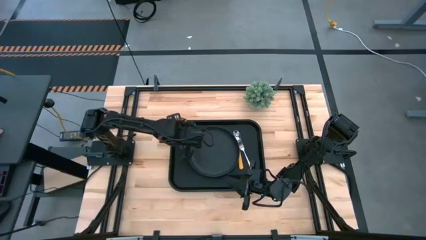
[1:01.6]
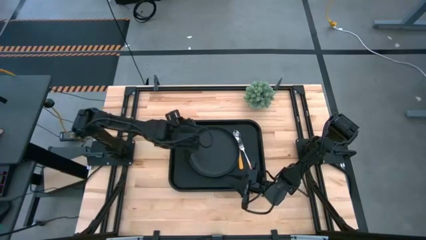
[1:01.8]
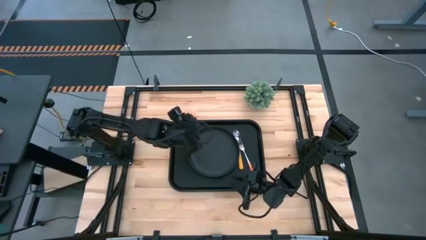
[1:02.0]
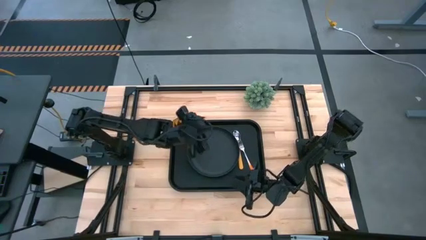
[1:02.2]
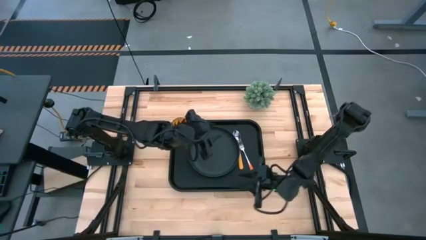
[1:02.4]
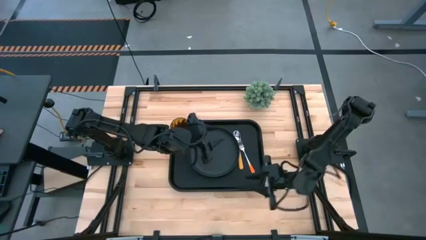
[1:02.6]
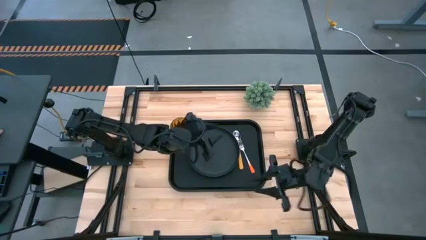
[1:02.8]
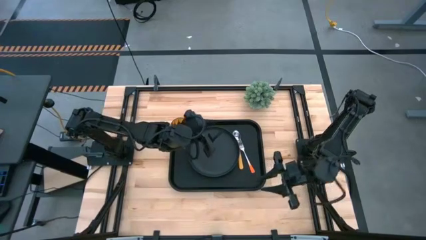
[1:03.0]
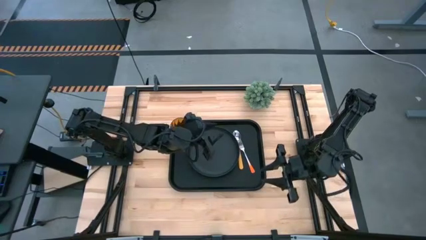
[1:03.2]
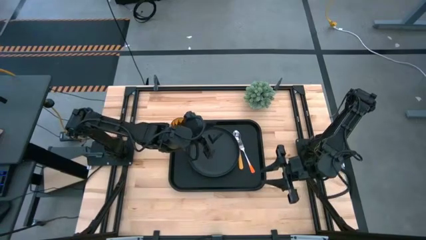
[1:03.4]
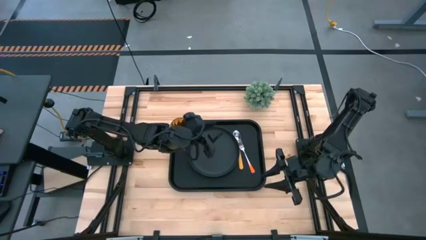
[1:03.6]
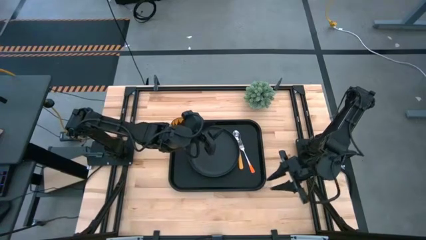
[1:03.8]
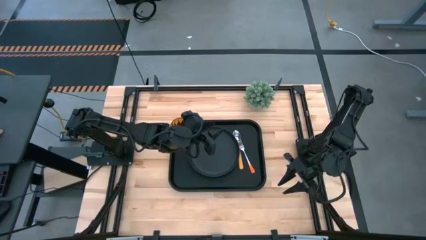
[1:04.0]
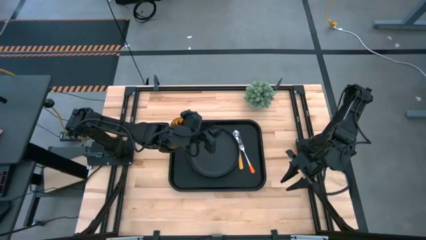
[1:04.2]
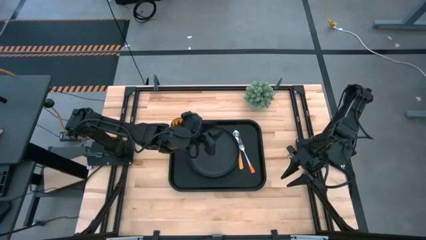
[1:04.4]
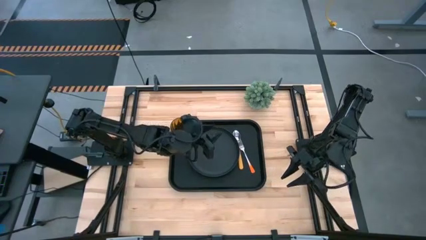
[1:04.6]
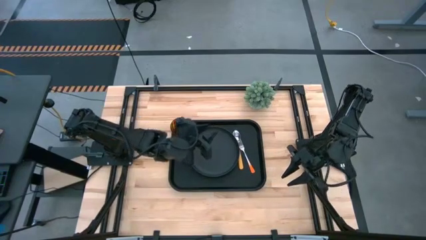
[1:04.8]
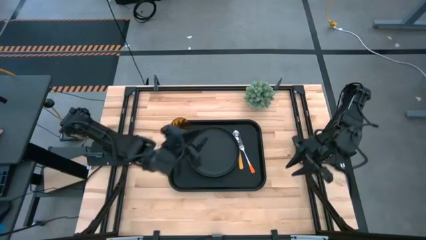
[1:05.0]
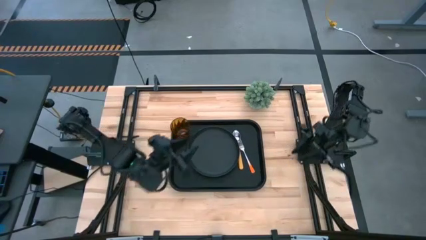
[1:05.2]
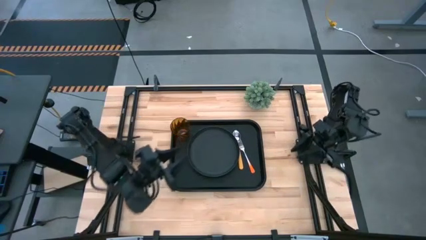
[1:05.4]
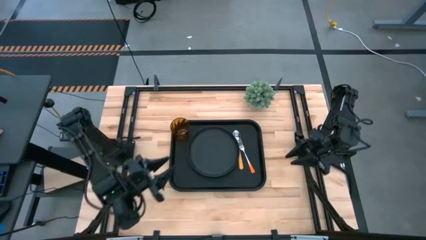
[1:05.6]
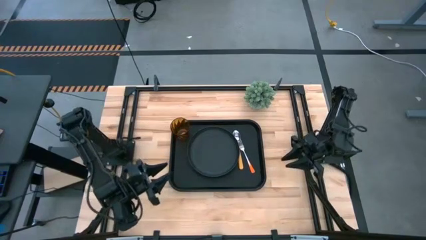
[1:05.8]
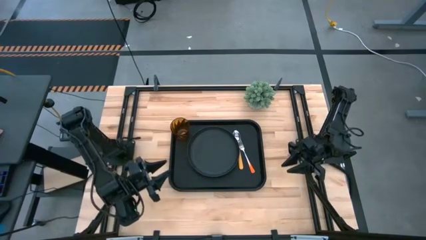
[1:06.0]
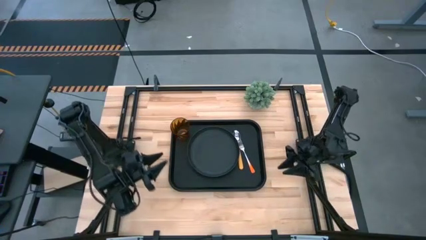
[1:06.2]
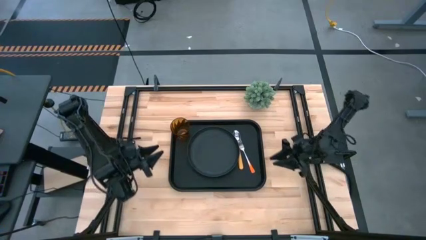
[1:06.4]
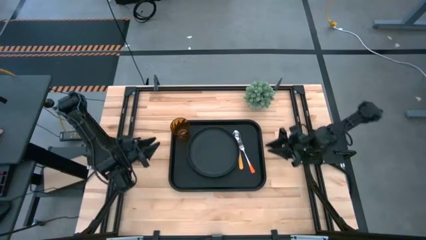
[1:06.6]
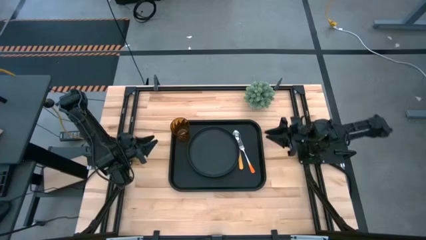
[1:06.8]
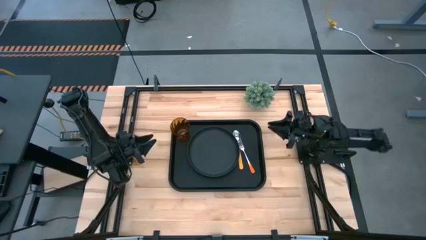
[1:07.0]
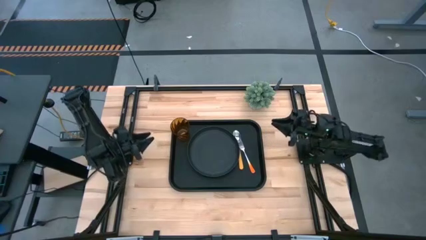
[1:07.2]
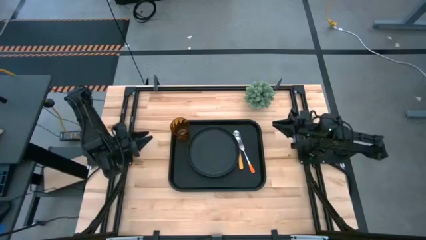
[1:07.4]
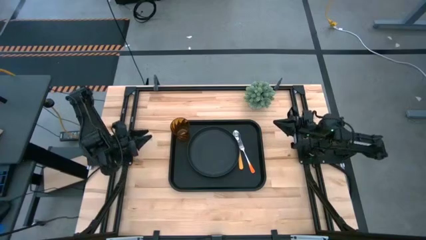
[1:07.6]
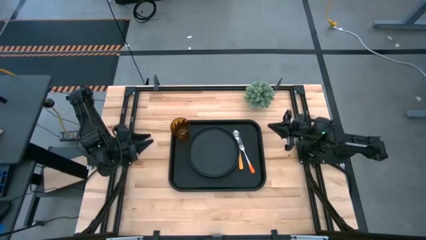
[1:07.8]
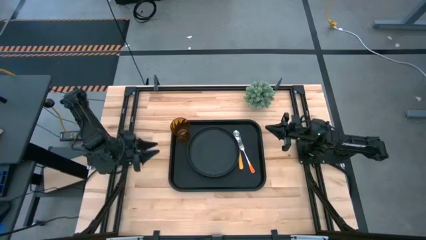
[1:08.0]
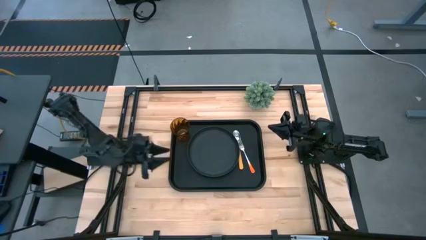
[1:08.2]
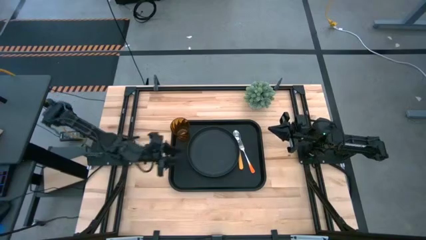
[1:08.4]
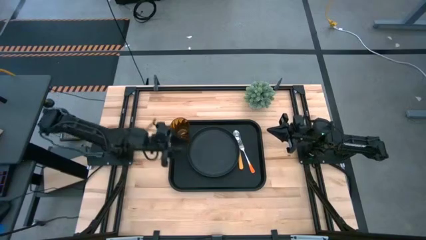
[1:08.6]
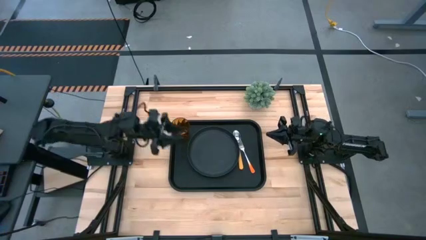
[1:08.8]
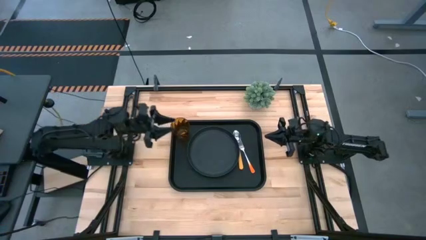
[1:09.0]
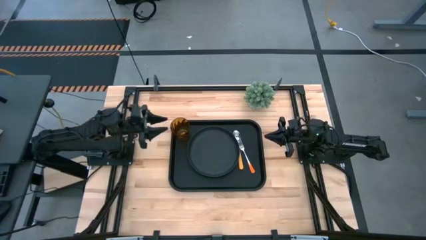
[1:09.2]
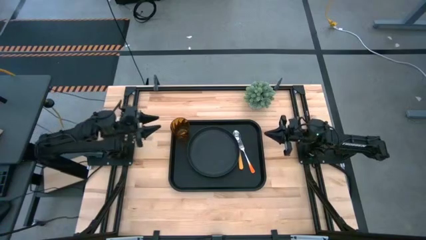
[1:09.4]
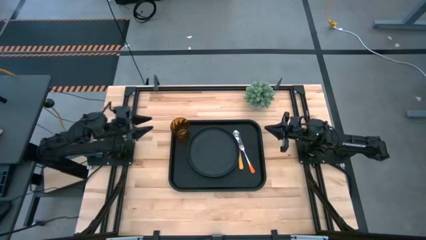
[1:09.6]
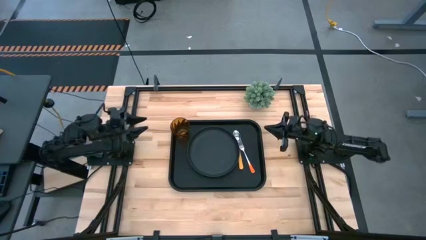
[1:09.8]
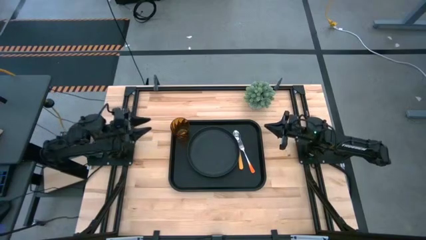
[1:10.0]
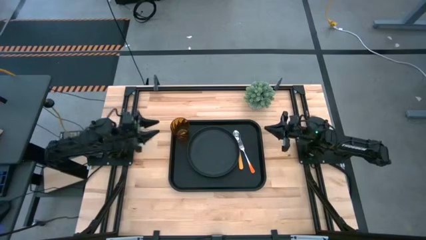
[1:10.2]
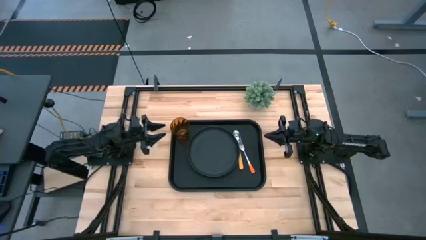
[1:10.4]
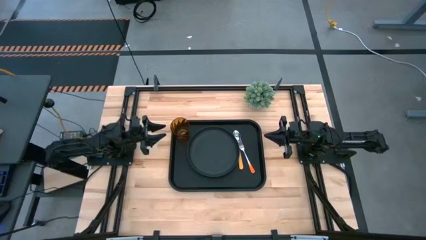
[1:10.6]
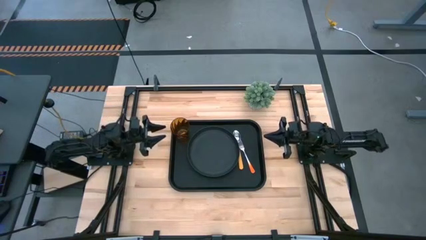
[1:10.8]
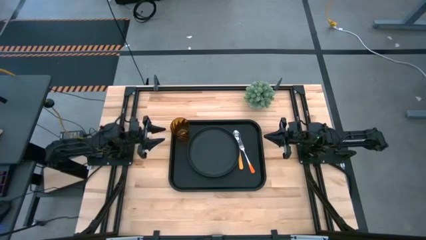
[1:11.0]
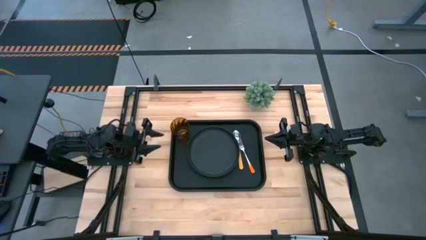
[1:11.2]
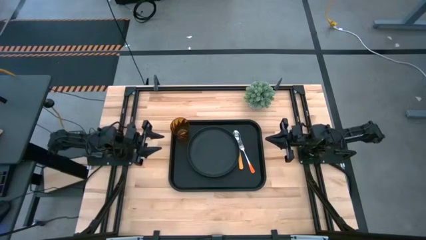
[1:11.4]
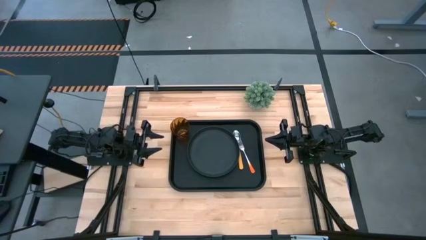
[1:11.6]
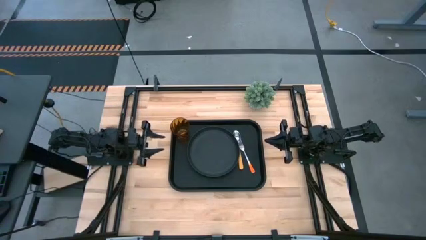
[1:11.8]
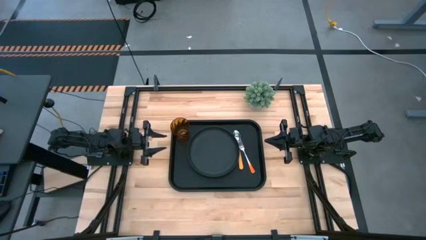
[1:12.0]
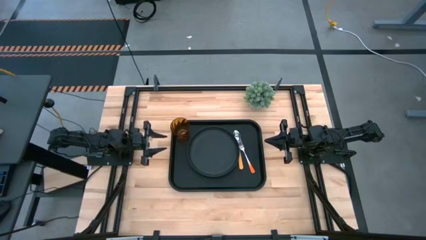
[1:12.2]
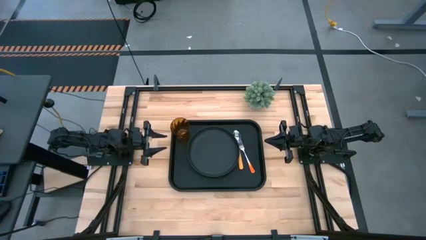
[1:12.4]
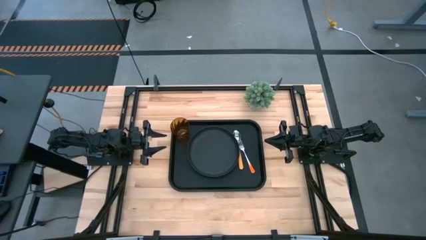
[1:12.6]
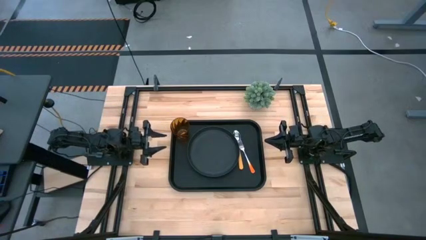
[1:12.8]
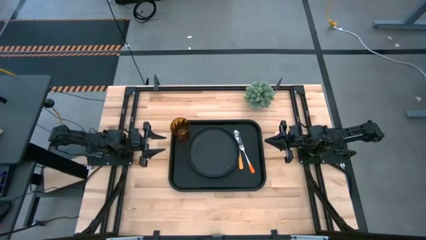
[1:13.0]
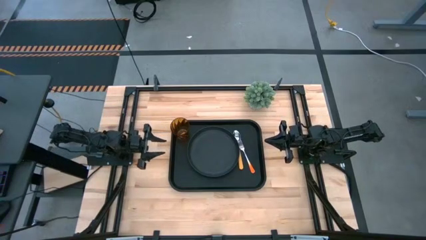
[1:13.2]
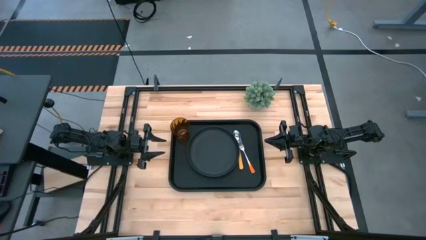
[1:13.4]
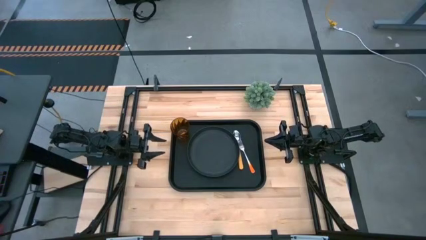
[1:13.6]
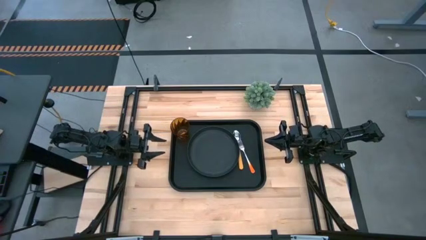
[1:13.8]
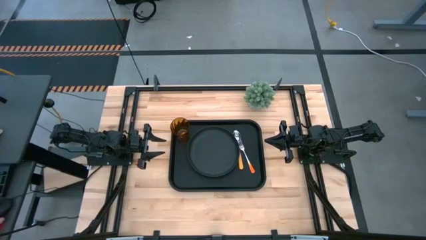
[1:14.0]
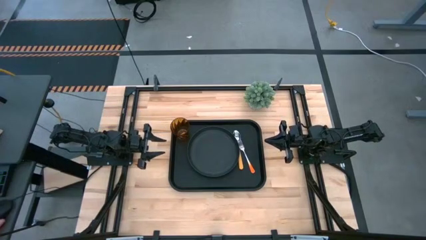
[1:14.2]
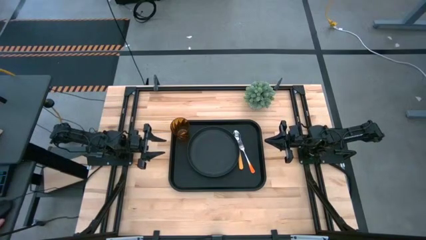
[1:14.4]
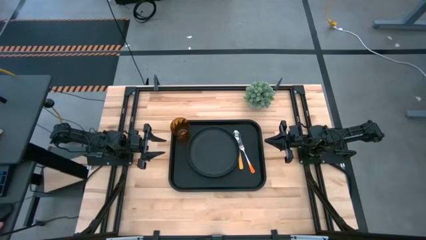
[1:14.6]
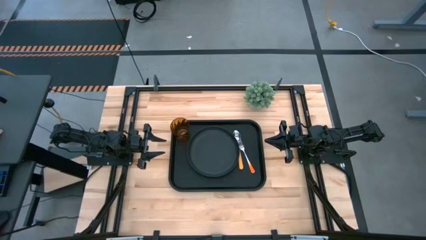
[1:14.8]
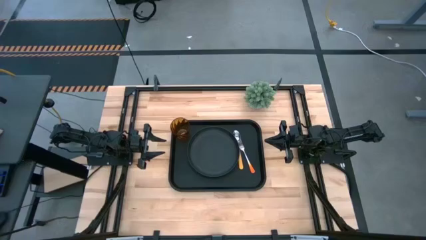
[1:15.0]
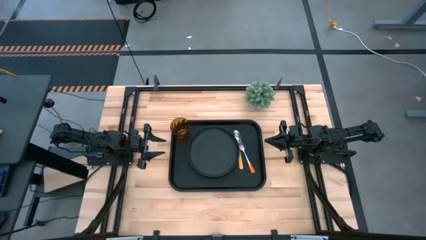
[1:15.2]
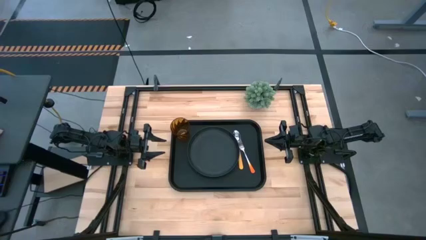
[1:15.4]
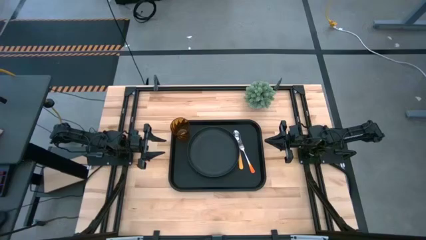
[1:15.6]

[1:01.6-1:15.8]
Task: Pick and place plate/cup/fork/spoon on tray
Return to Home Position

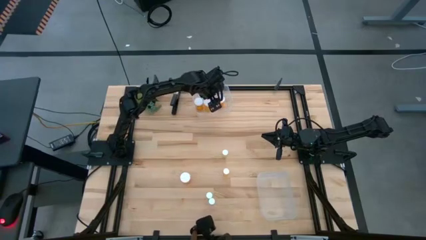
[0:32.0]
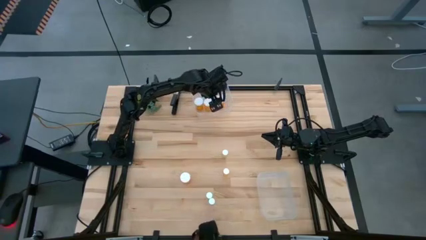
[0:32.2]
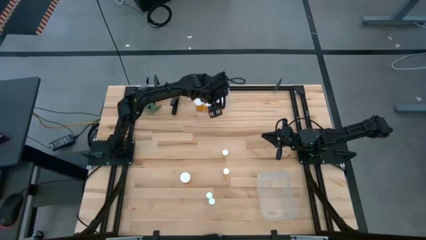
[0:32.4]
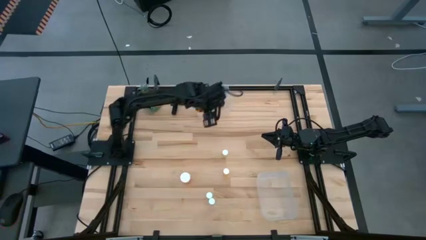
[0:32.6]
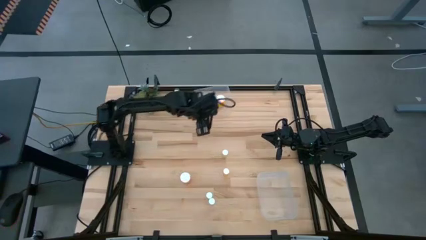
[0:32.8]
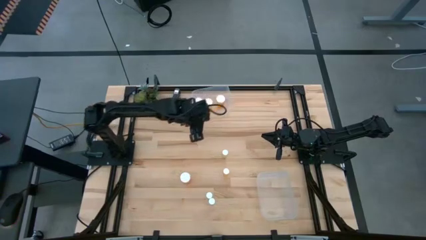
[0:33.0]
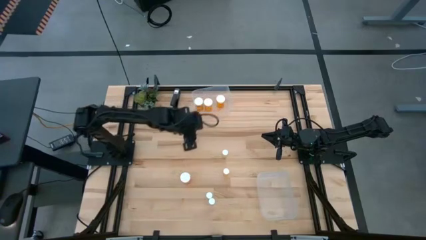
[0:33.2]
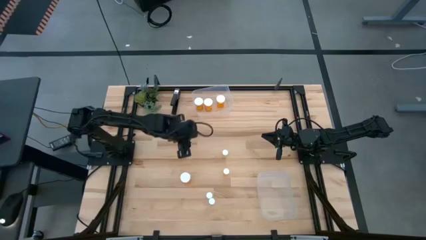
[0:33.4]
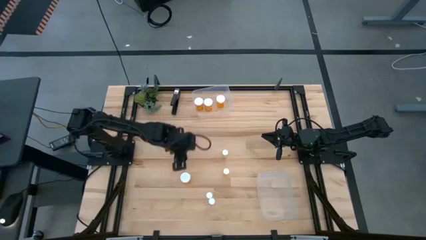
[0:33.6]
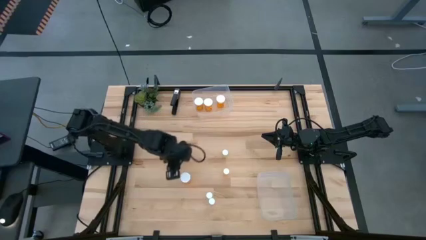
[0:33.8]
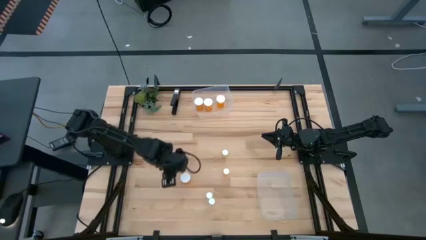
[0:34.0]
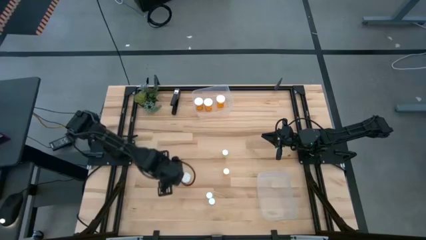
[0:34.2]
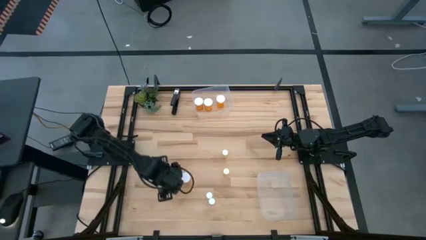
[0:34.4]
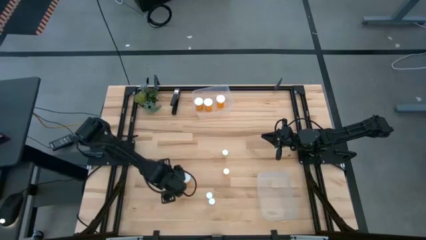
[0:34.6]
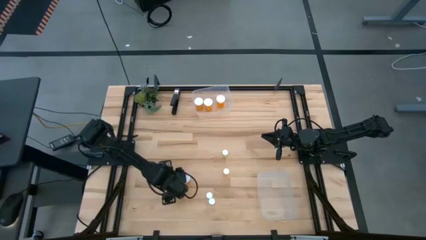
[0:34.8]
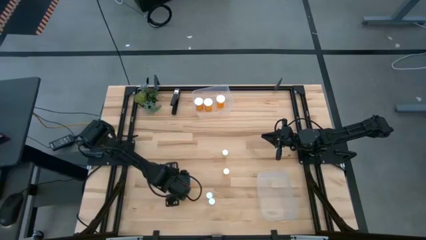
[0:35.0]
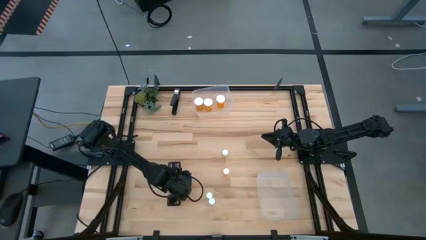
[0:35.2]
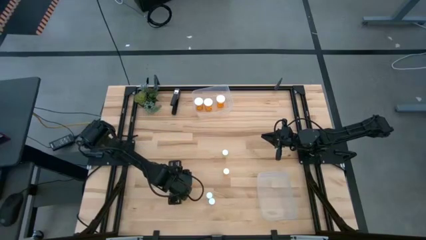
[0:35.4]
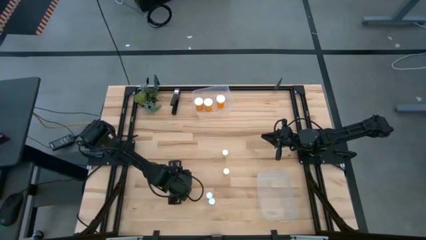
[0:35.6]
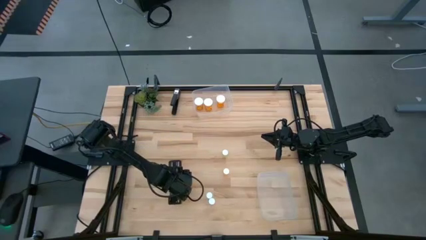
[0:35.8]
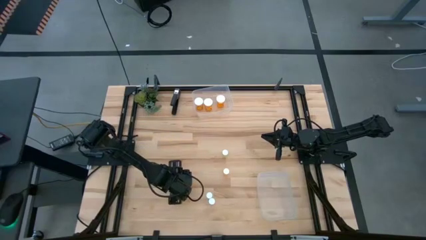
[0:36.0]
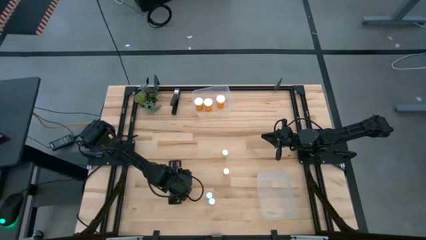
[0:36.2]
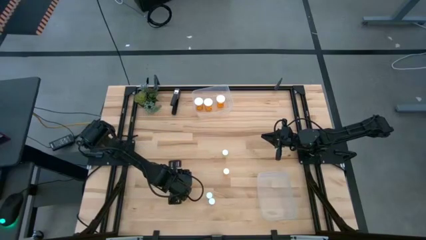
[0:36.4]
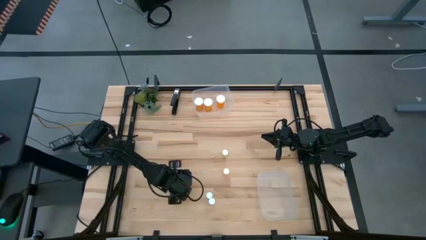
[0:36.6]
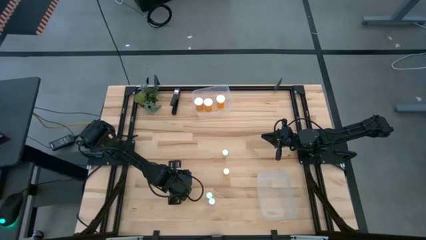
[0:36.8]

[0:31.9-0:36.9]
Task: Pick and place medicine bottles into bin by pill shape (circle, oval)
Put the big orange pill bottle into the top transparent bin
